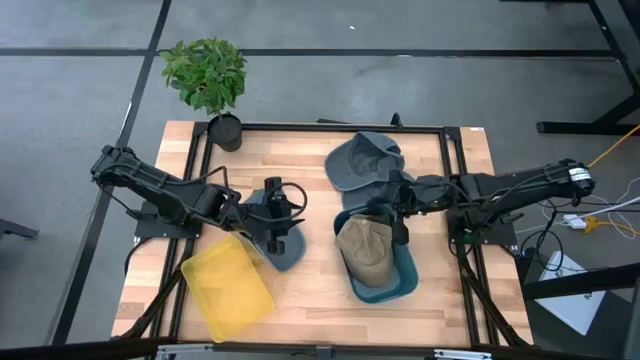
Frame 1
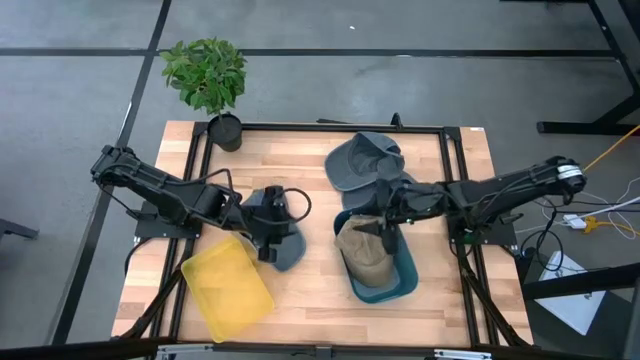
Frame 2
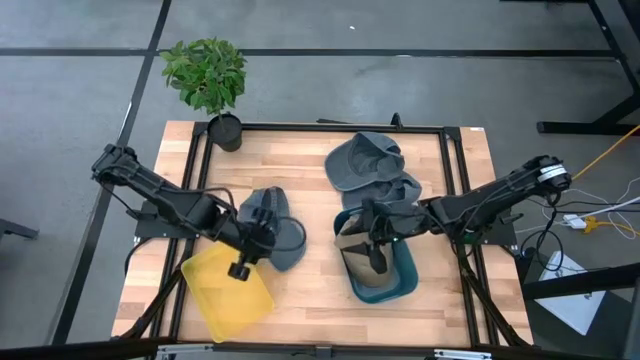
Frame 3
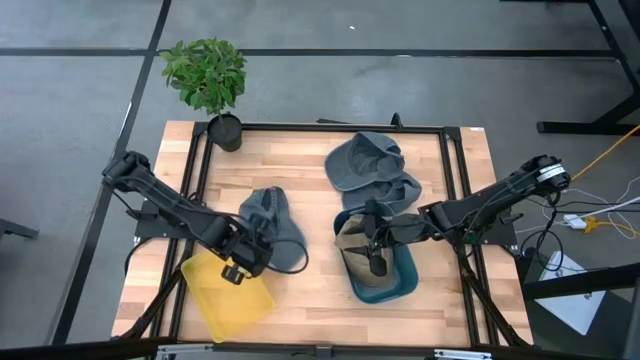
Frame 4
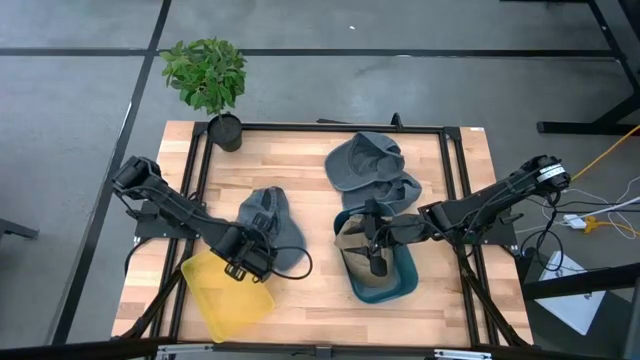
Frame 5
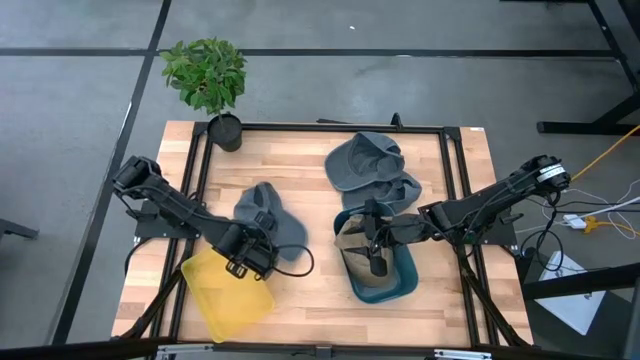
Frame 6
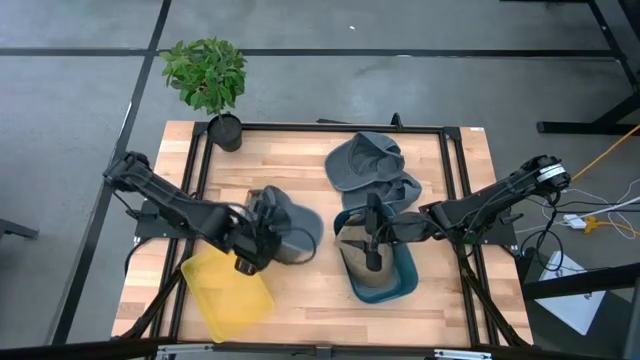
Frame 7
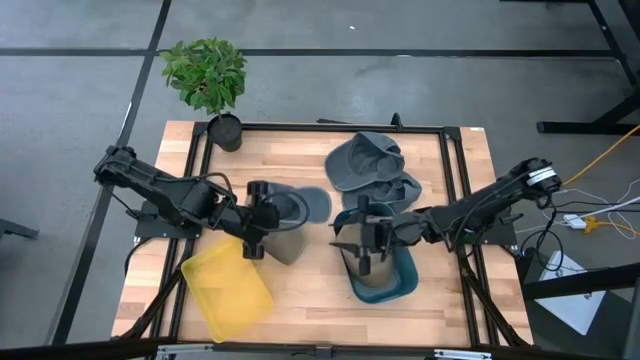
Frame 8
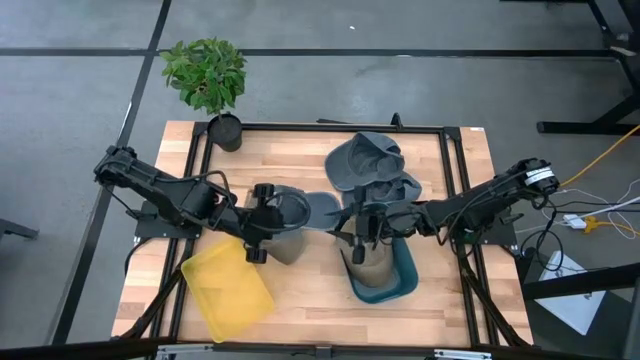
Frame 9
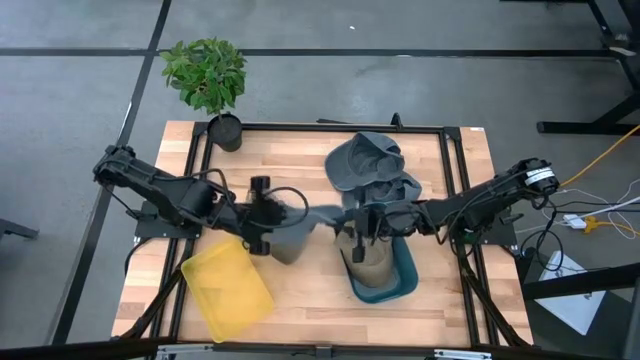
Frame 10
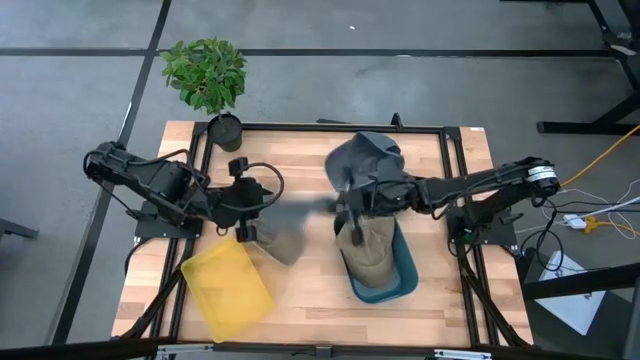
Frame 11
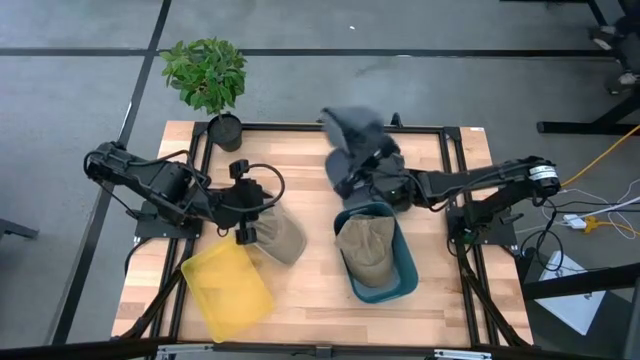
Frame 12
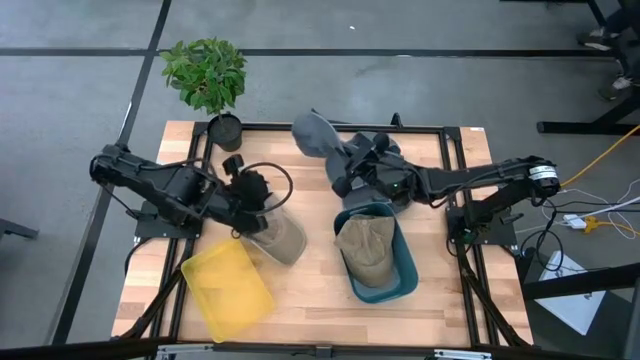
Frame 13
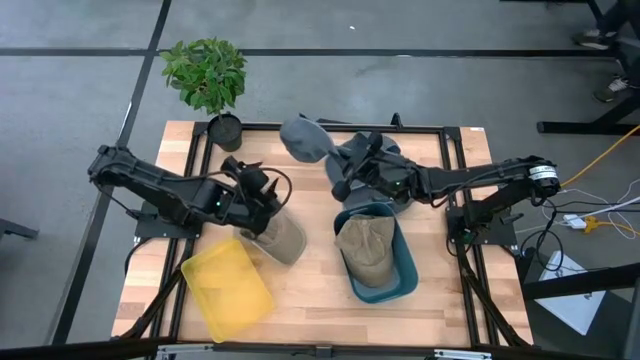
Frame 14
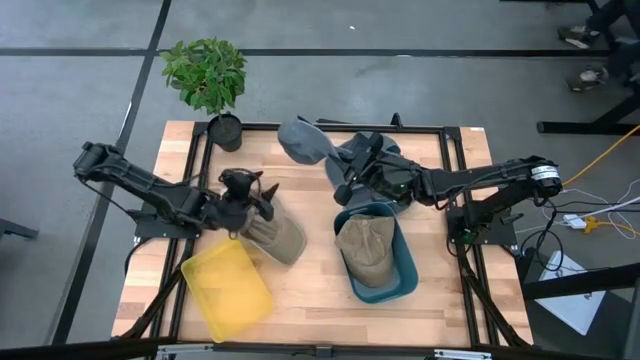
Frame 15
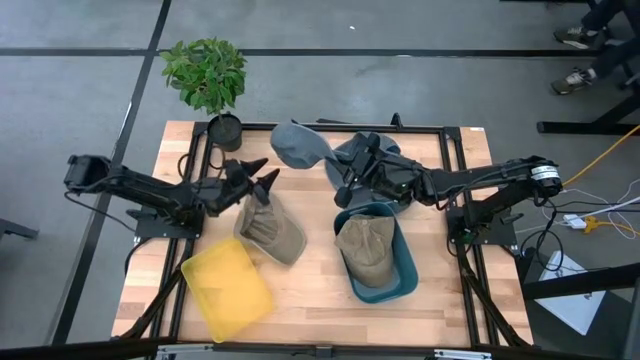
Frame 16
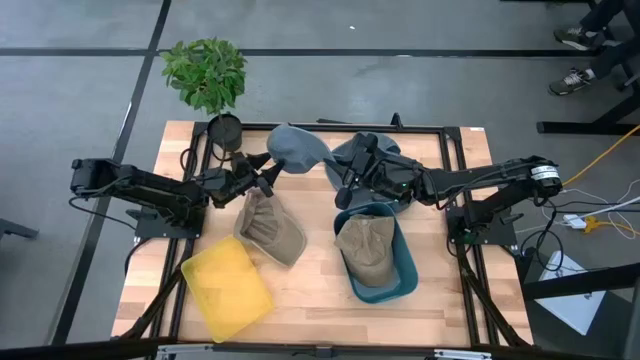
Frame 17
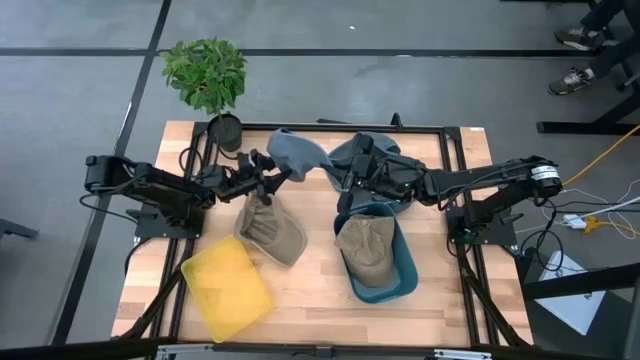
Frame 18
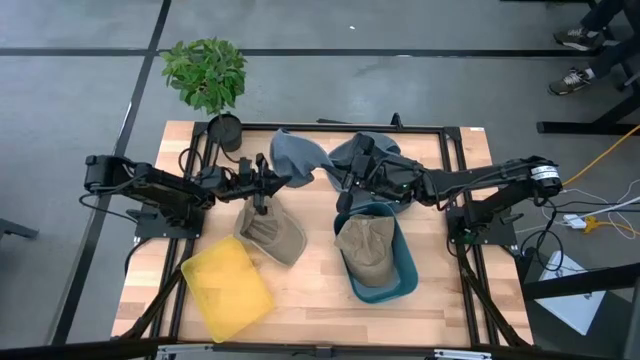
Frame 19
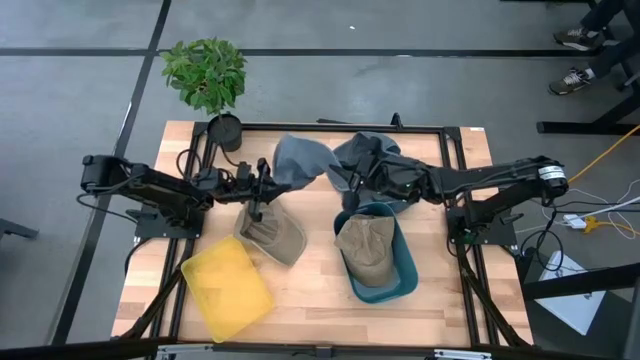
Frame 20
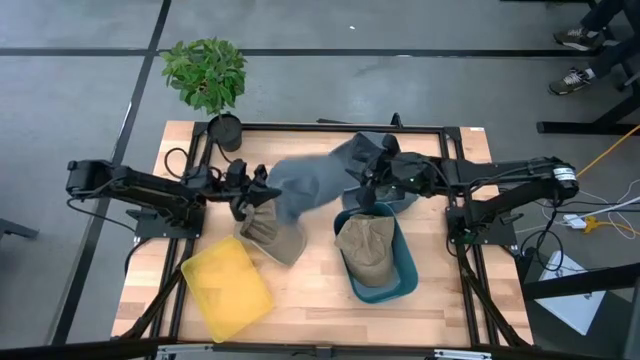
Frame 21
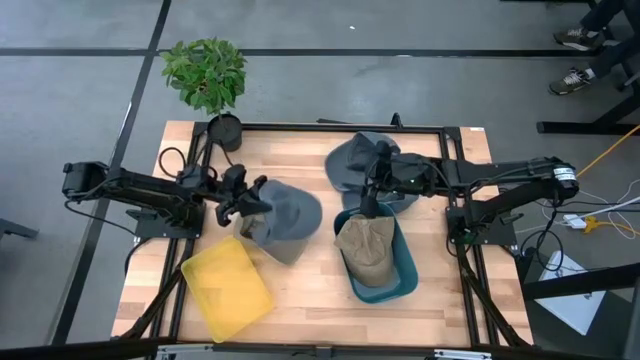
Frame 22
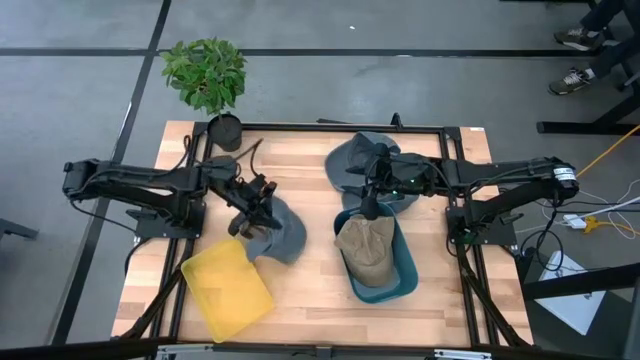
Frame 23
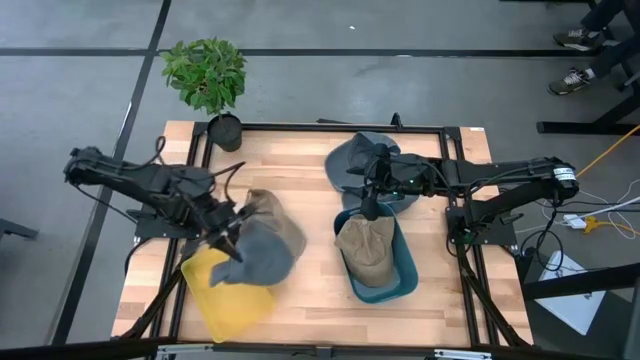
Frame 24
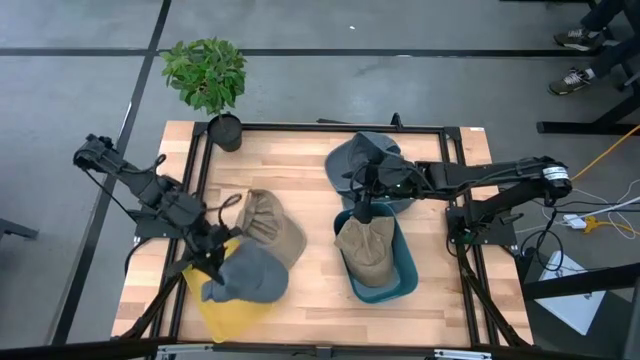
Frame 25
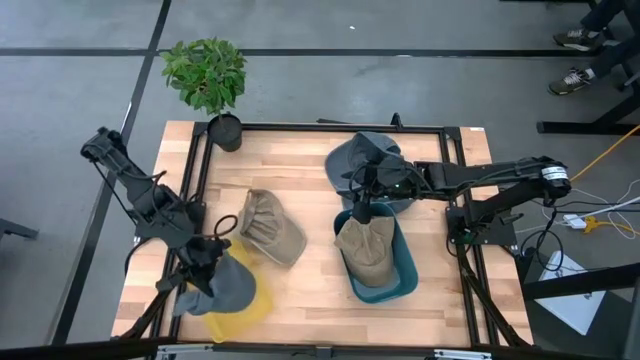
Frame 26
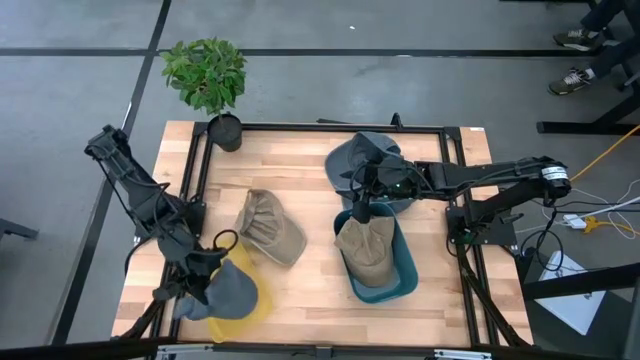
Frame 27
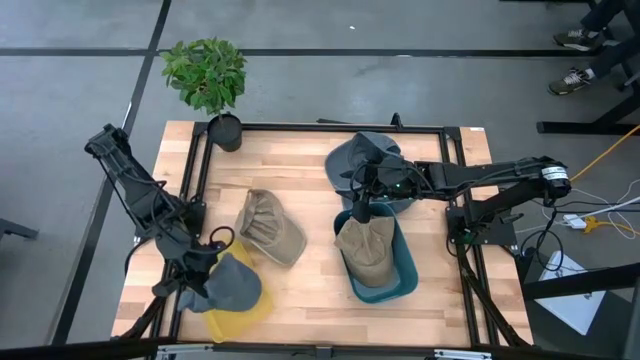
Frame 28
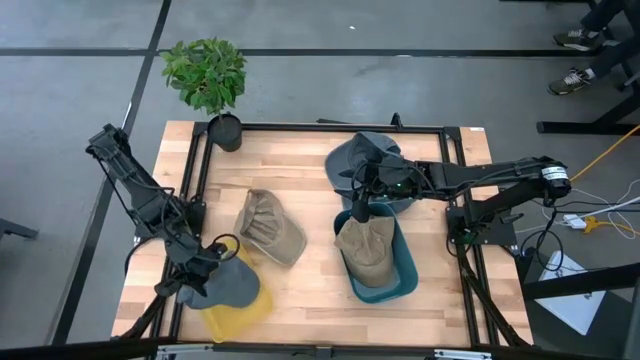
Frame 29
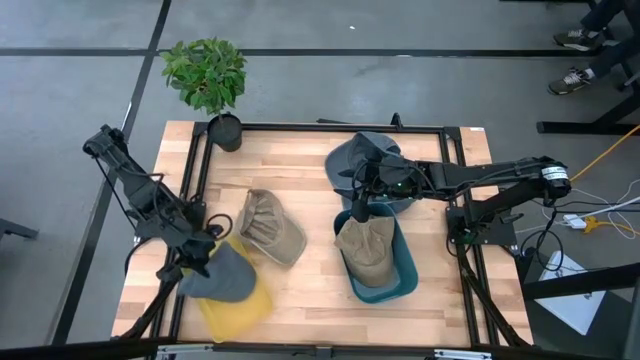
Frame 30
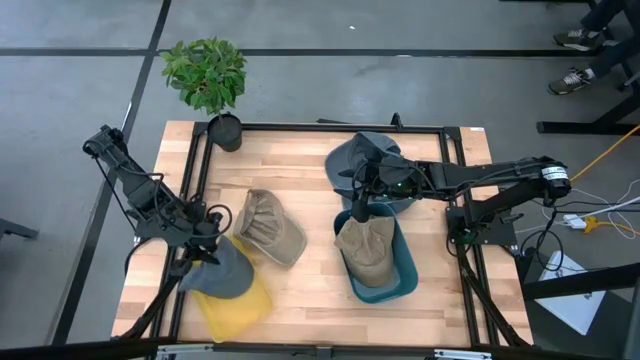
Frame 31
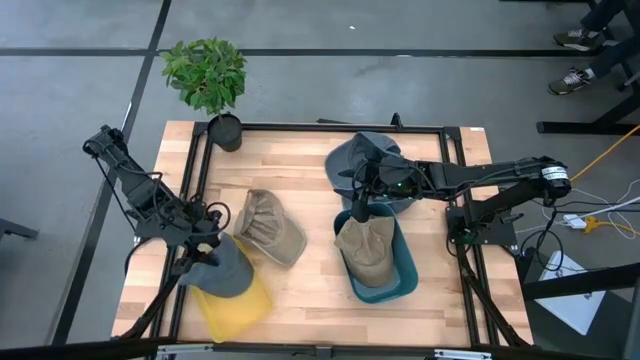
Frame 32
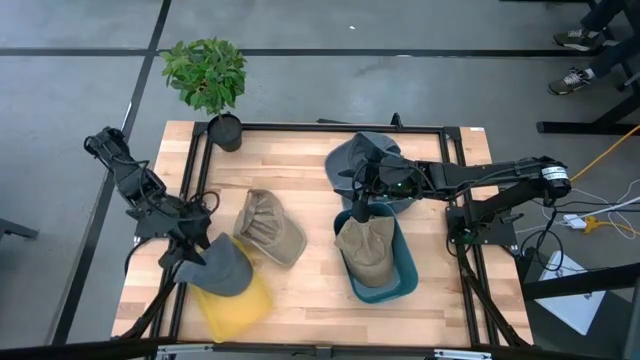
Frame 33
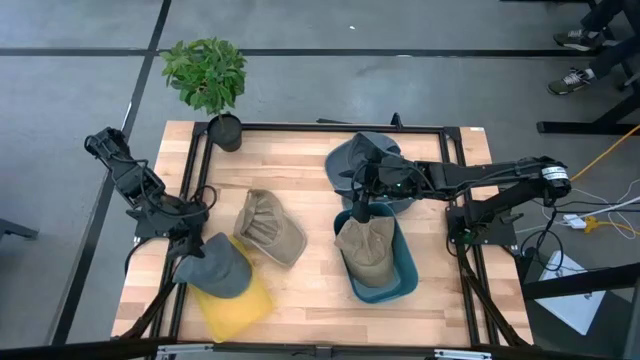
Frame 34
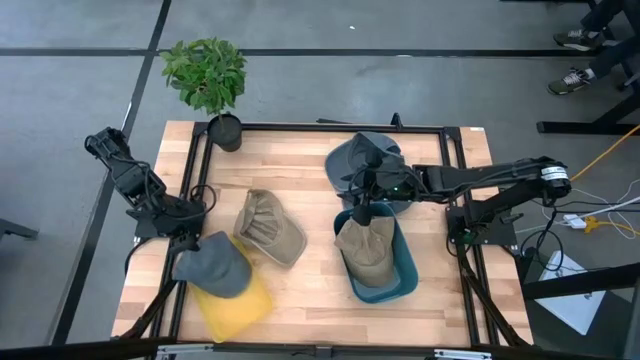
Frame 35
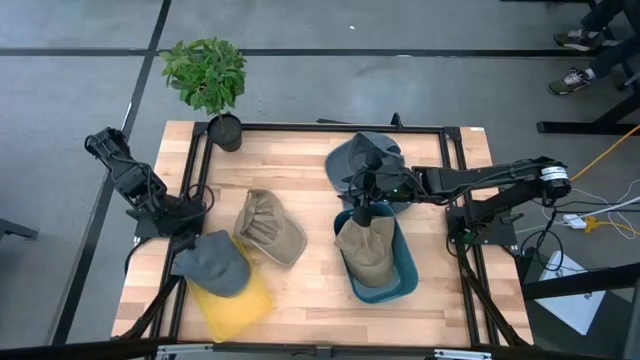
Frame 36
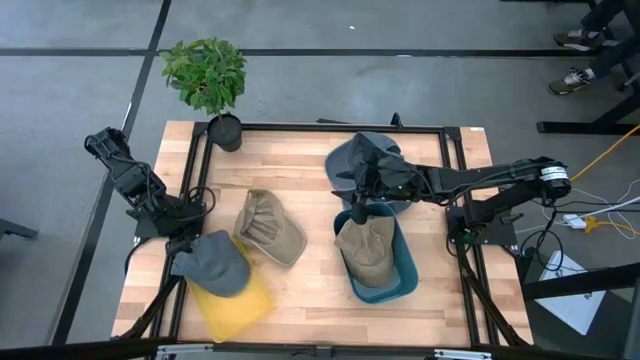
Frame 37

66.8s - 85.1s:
Task: Pick & Place hat
Put the left blue cap into the yellow bin

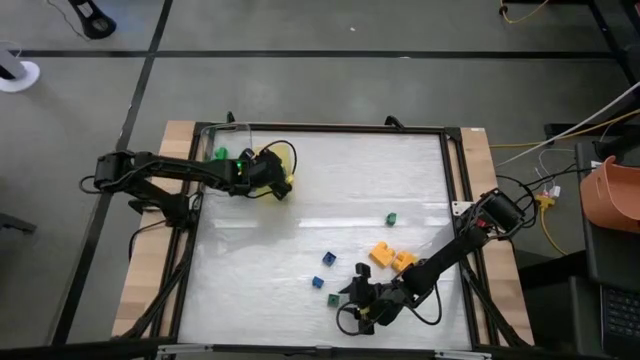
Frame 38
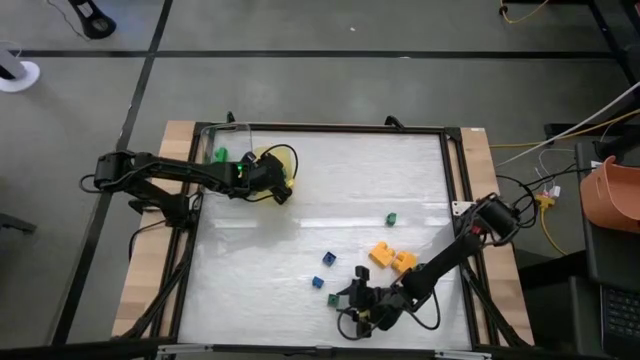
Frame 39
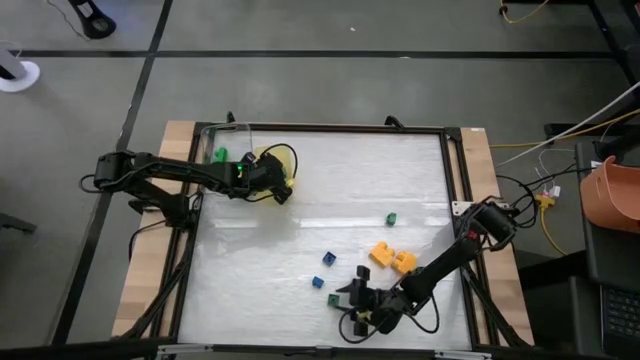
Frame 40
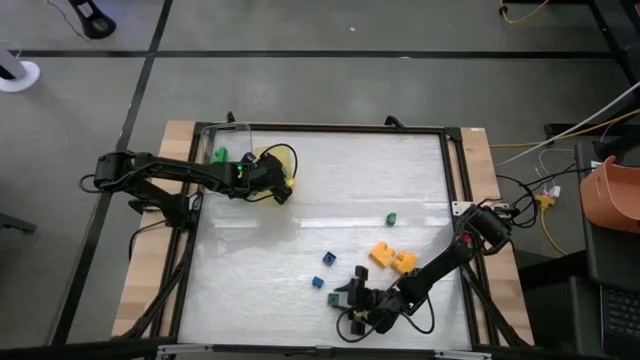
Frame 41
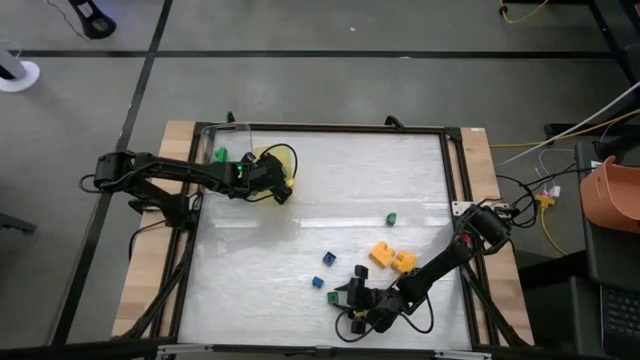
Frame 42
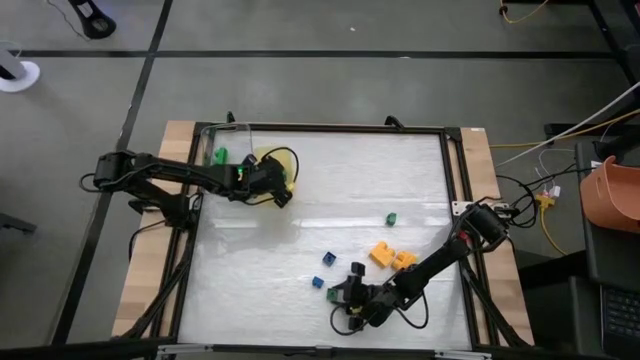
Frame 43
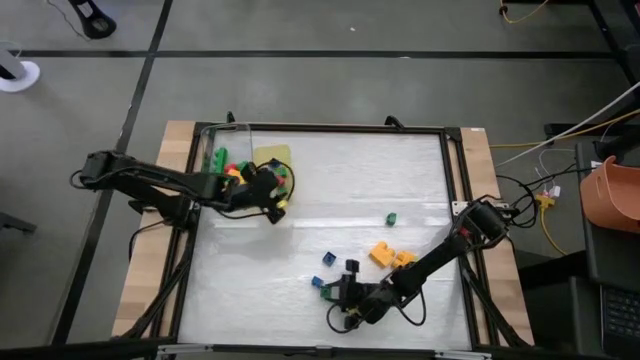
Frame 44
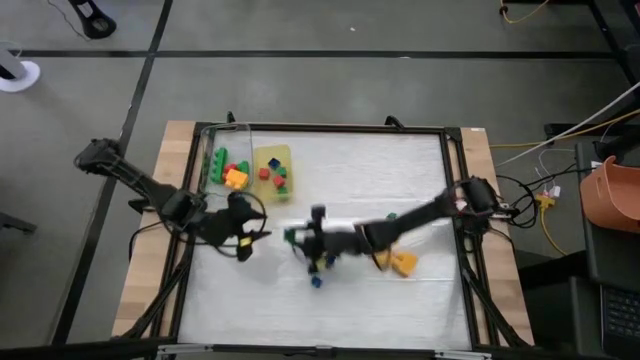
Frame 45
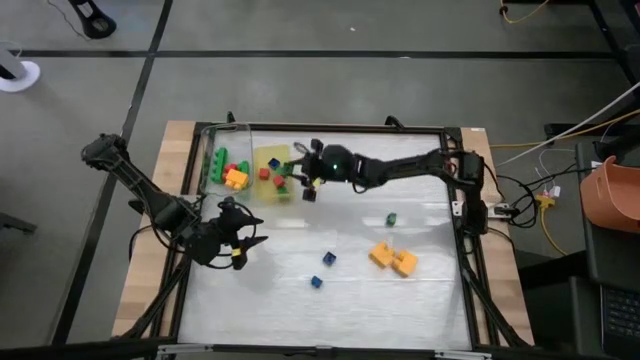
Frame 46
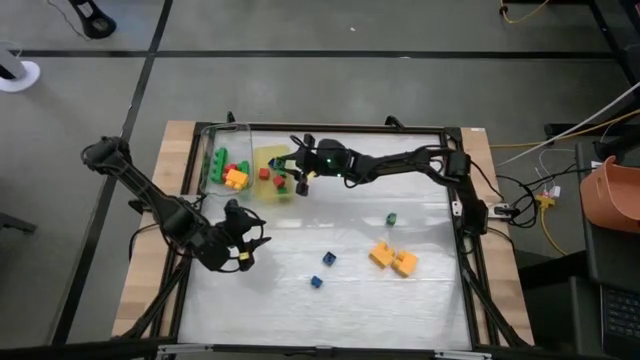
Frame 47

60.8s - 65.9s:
Task: Sort blocks by size
Put the small green game piece into the yellow bin
